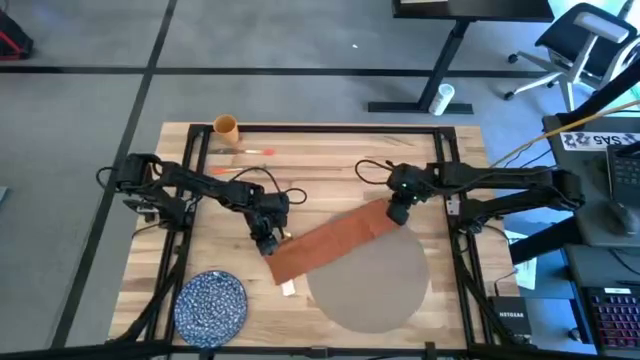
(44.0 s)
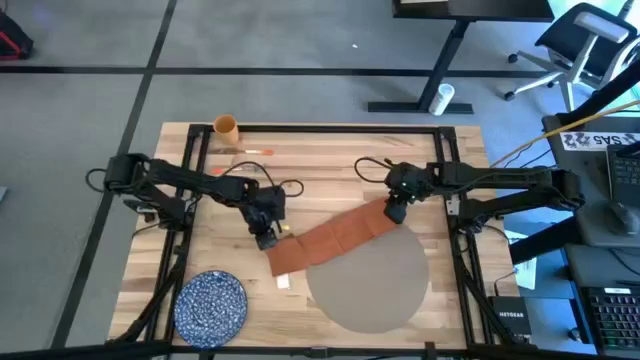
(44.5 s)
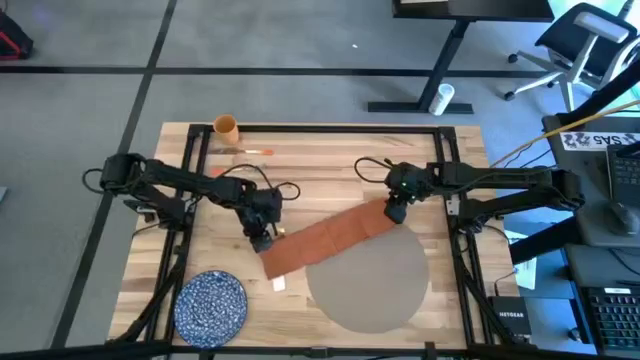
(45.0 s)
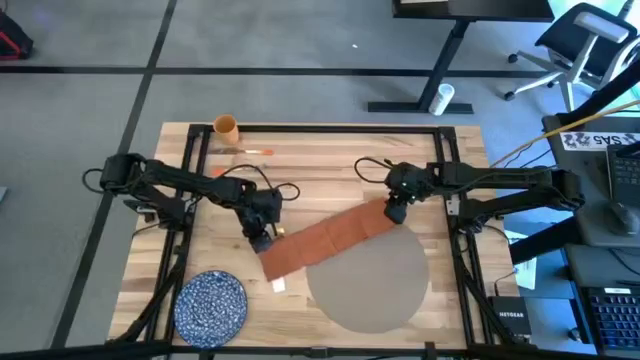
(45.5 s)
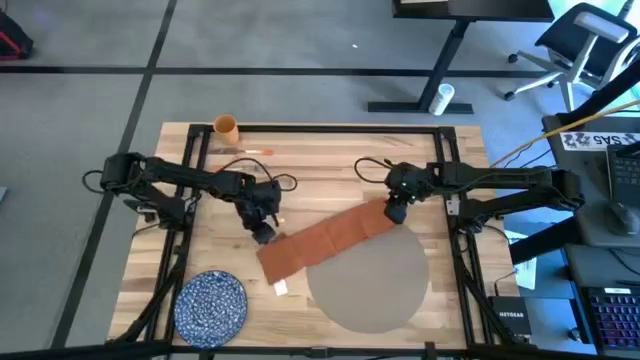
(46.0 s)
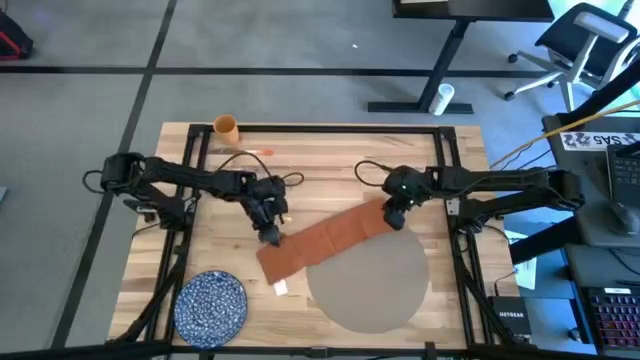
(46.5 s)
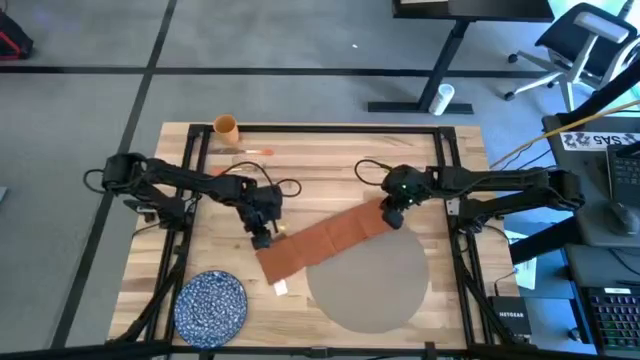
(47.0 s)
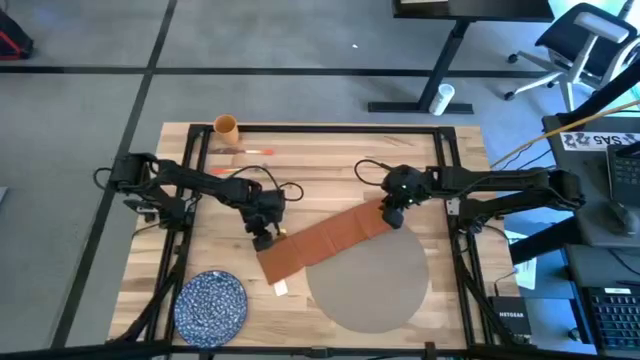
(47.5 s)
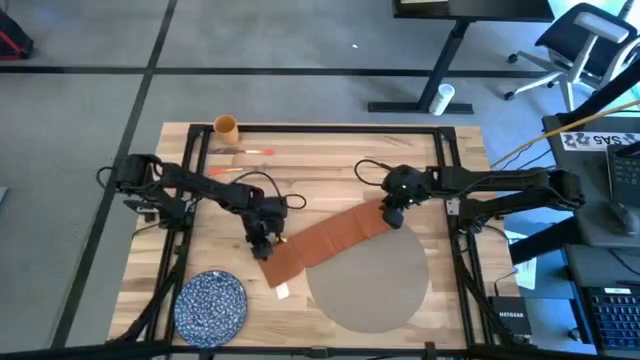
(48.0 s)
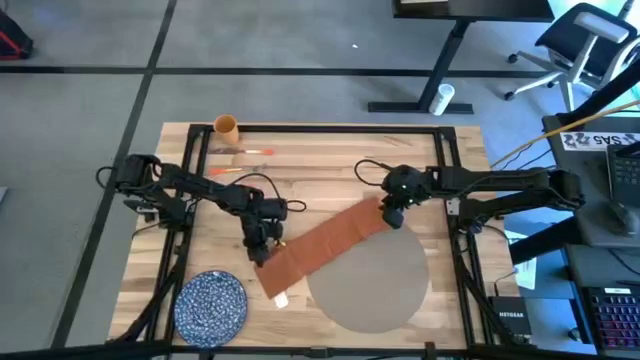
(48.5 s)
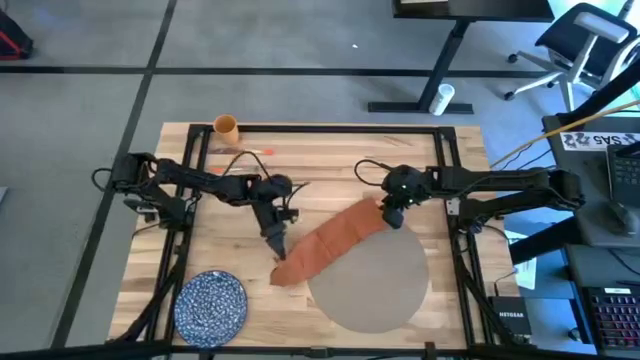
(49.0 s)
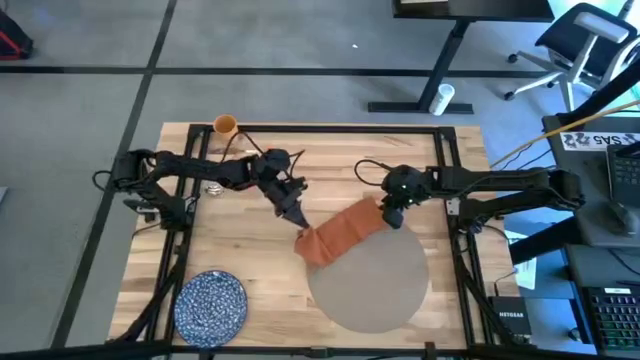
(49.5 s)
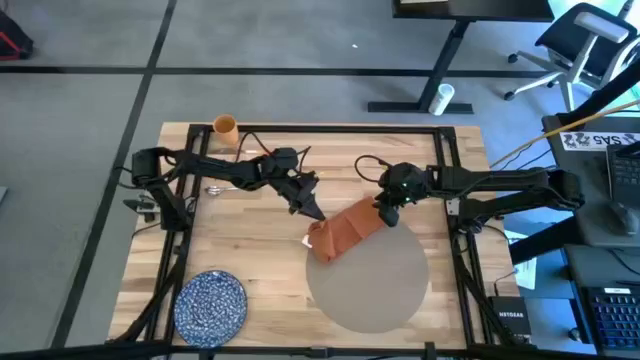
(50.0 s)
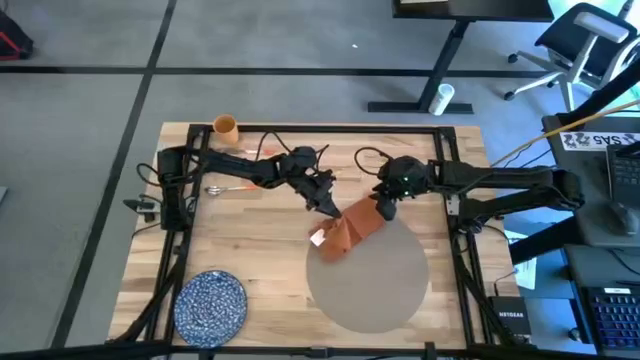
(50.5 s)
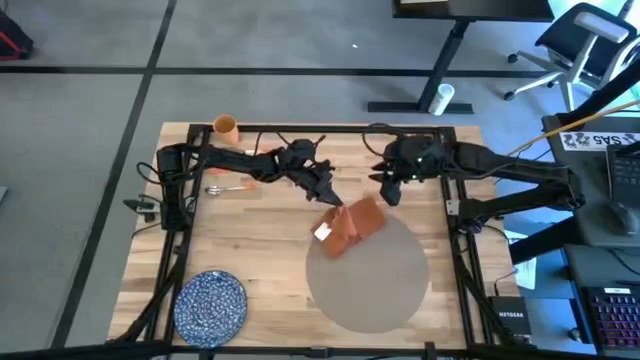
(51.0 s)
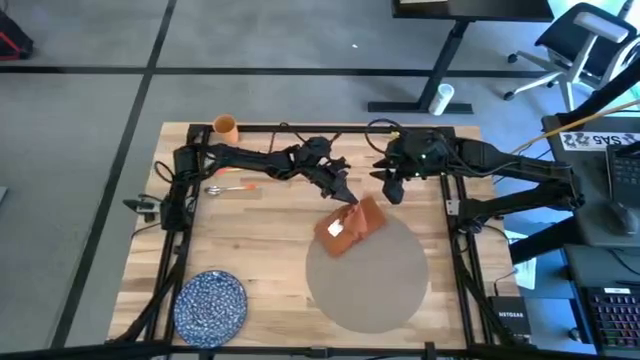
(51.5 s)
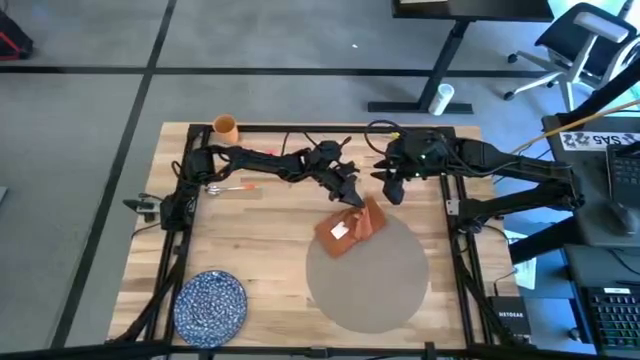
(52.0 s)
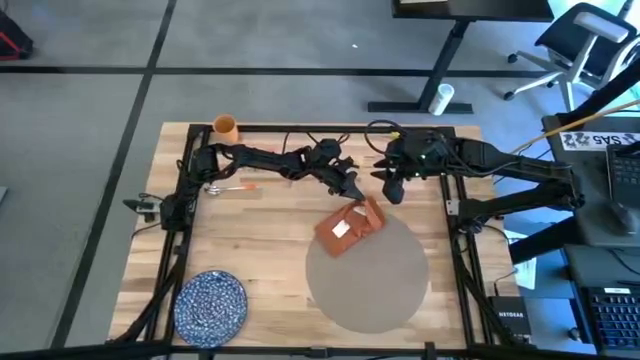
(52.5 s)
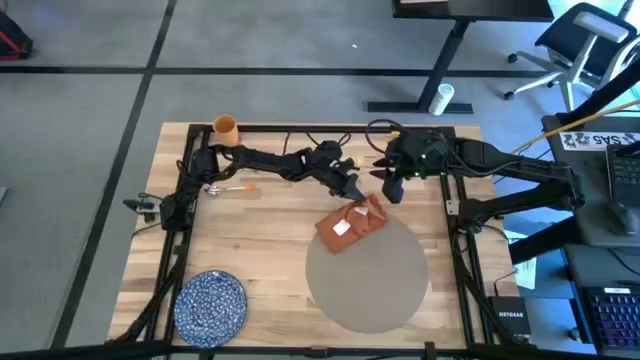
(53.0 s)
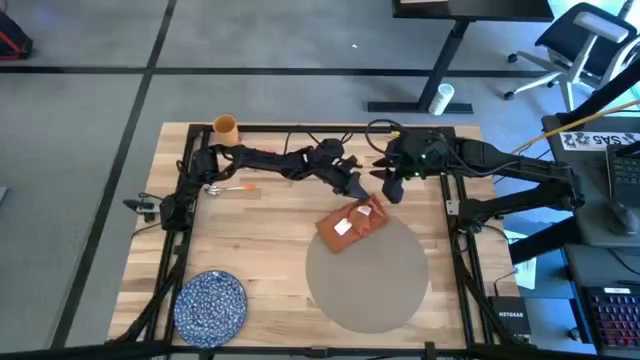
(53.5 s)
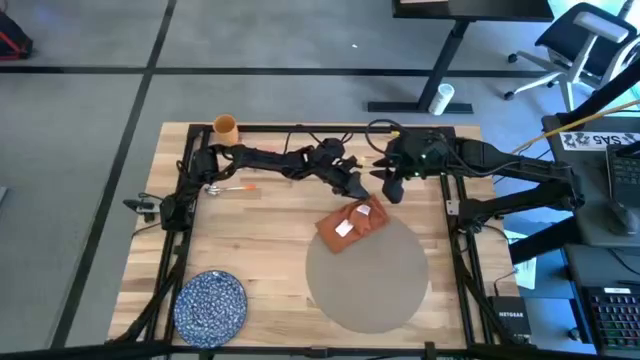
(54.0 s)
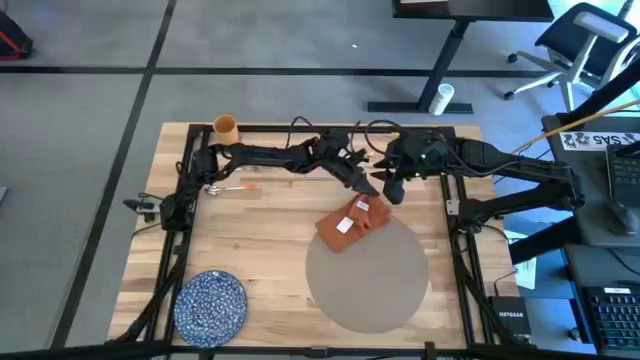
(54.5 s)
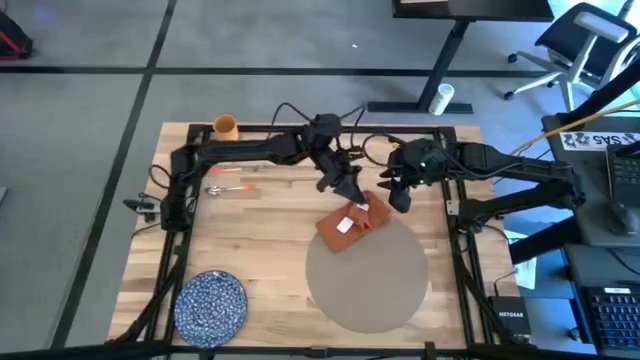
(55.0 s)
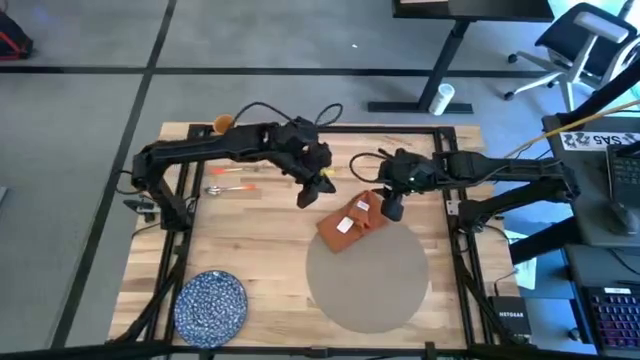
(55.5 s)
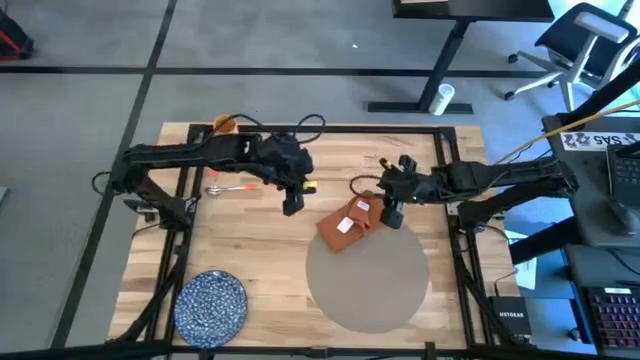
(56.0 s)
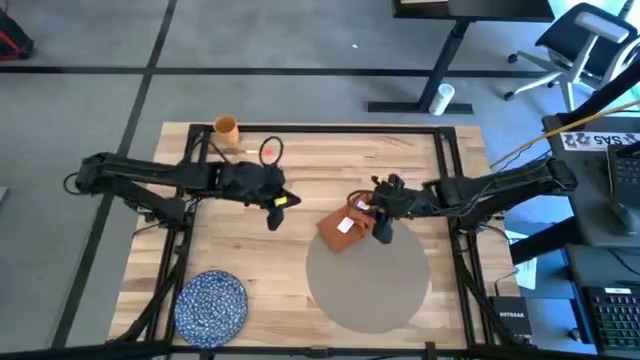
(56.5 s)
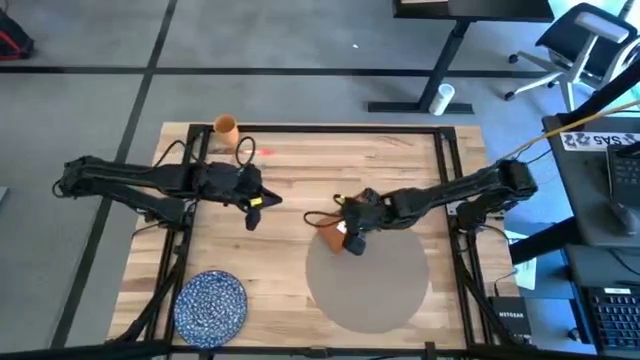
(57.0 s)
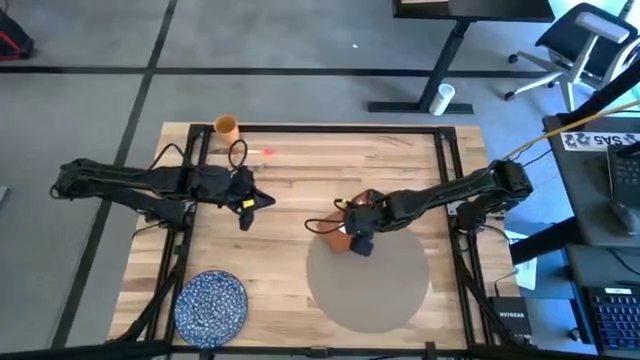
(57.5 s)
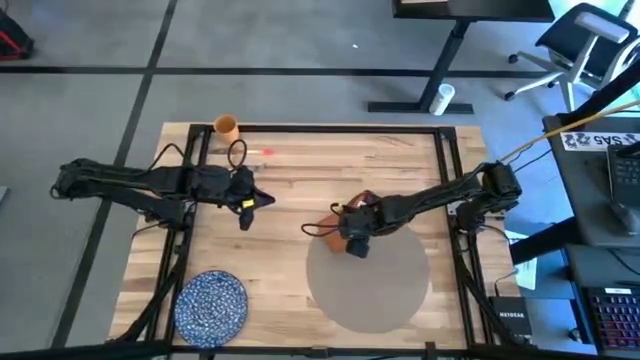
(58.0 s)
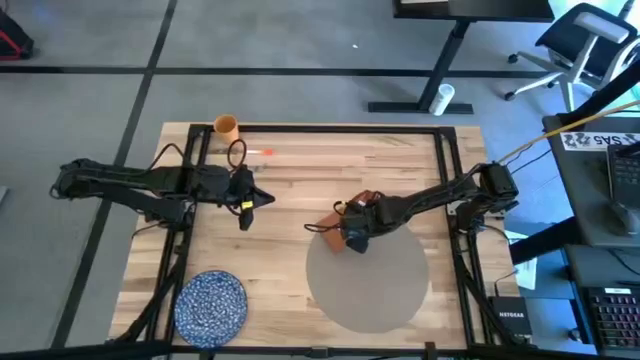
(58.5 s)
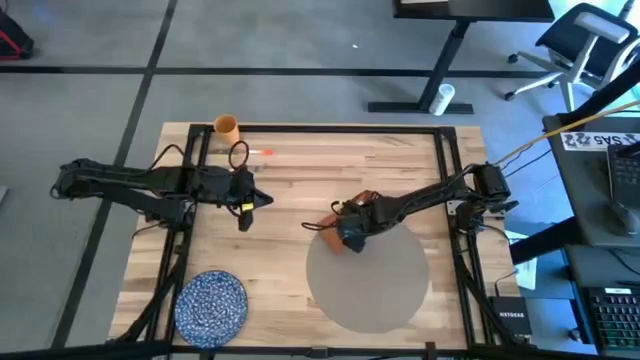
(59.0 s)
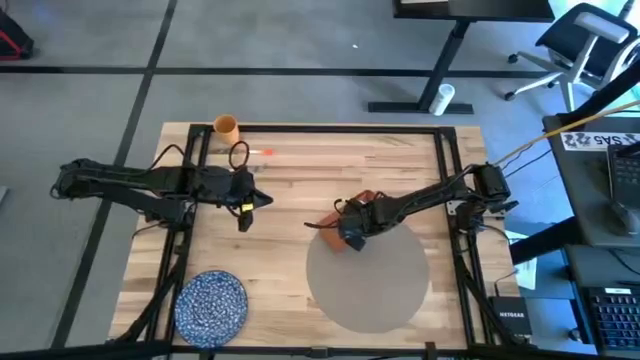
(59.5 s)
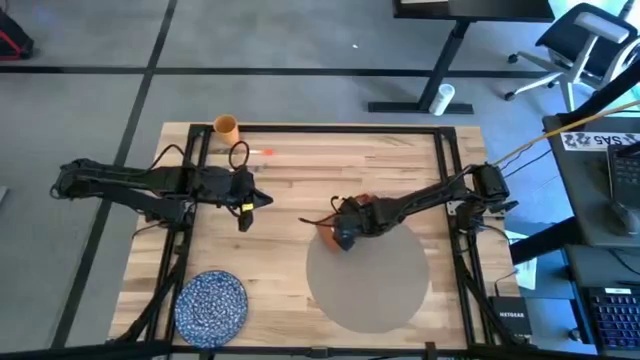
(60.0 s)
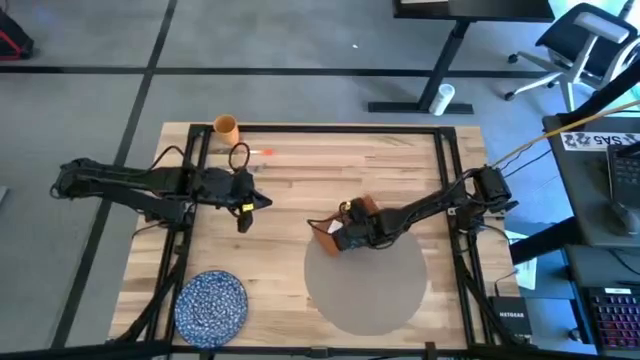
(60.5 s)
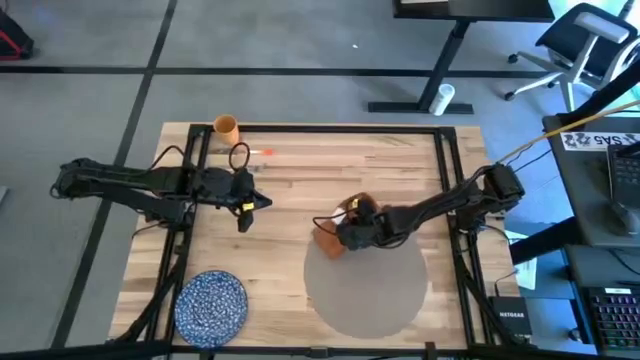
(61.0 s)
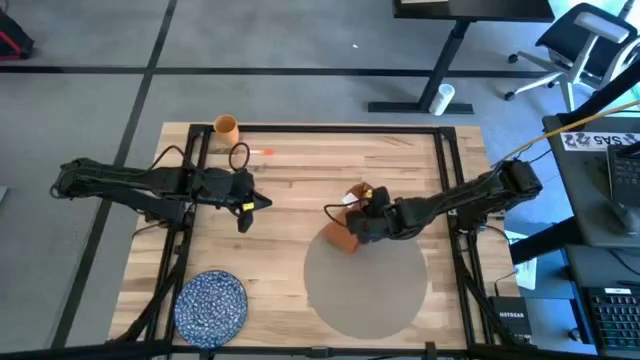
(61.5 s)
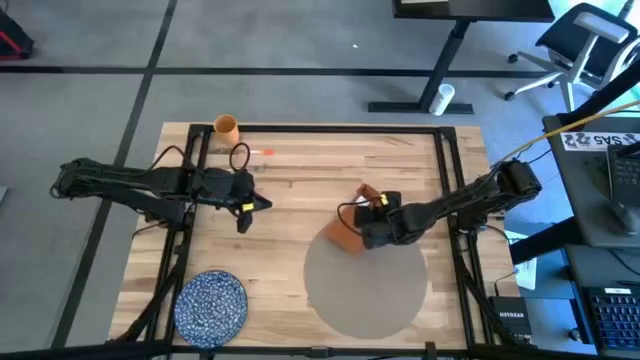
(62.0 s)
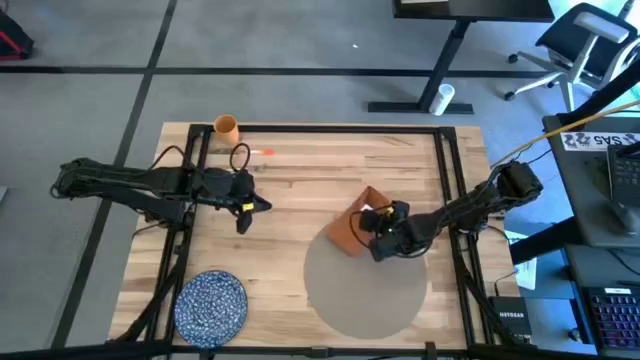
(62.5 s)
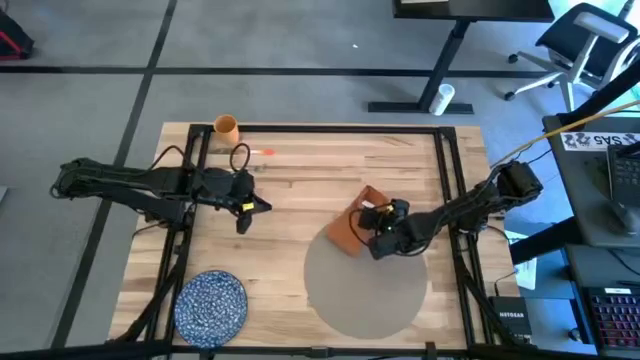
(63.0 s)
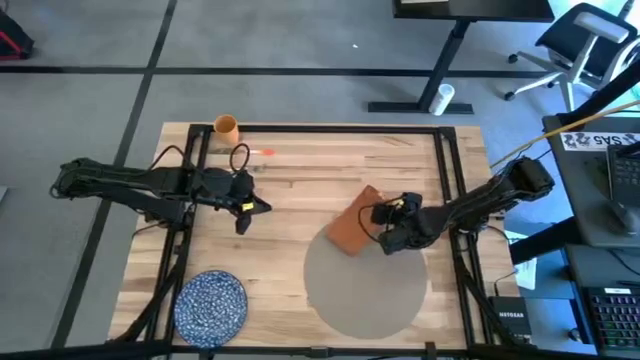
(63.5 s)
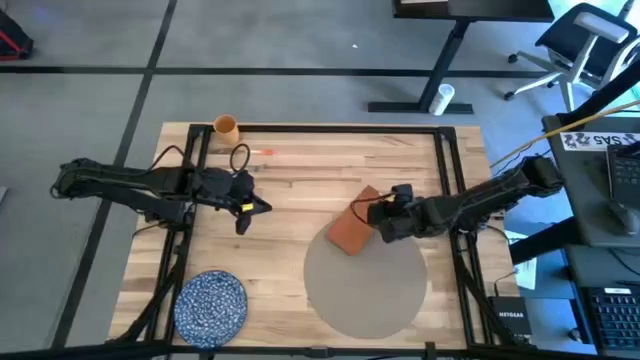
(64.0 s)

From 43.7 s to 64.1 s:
Task: Set table place
Fold the orange napkin
